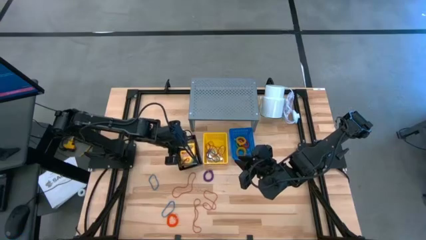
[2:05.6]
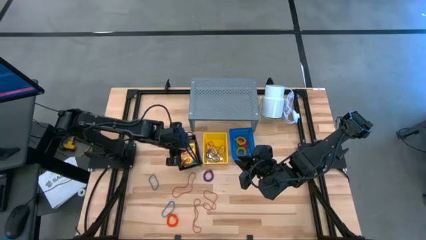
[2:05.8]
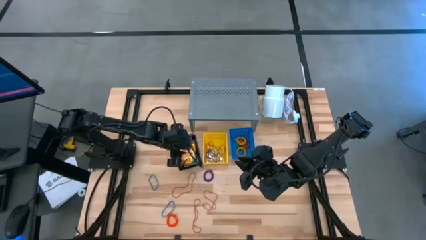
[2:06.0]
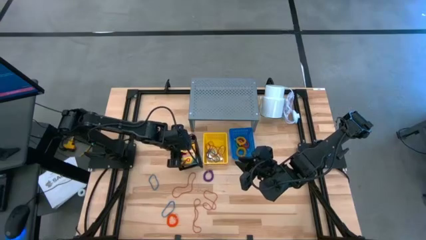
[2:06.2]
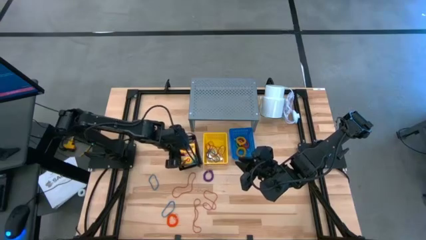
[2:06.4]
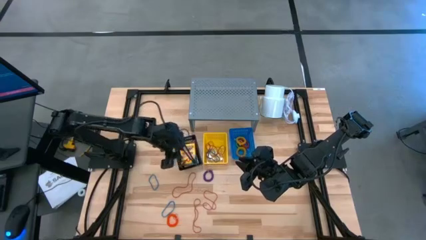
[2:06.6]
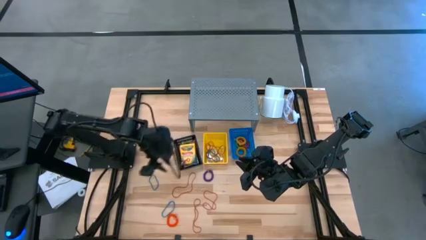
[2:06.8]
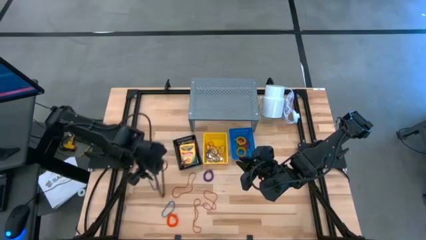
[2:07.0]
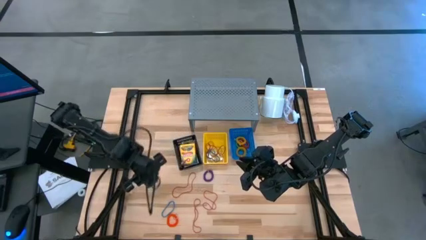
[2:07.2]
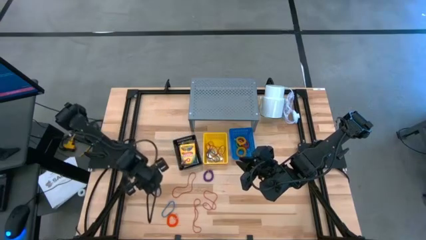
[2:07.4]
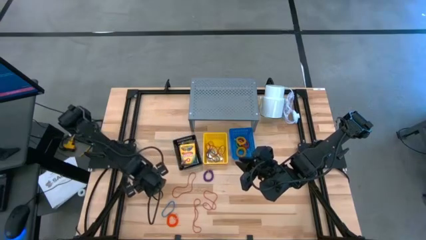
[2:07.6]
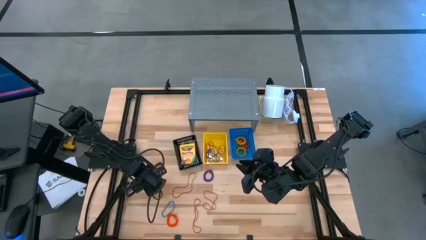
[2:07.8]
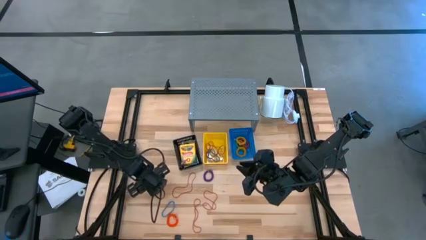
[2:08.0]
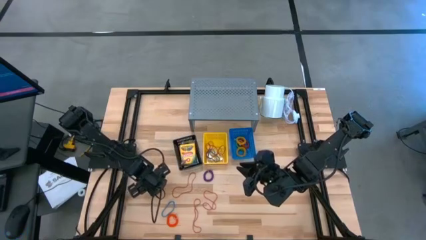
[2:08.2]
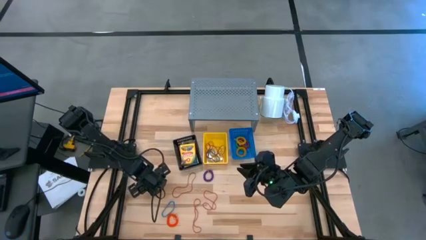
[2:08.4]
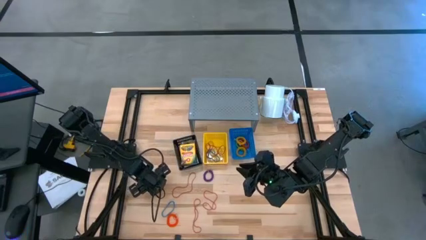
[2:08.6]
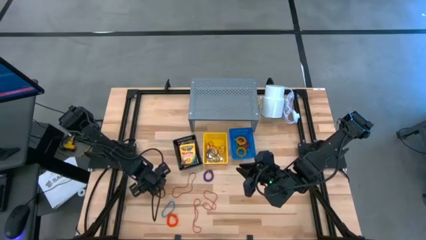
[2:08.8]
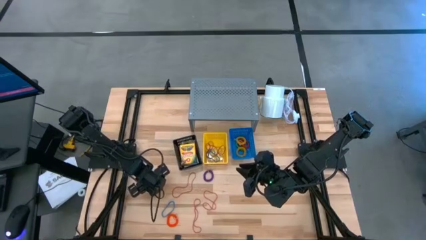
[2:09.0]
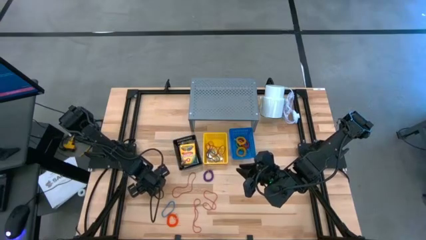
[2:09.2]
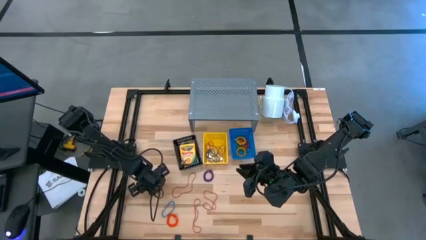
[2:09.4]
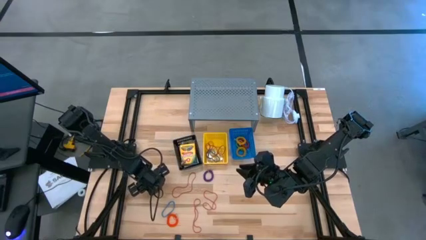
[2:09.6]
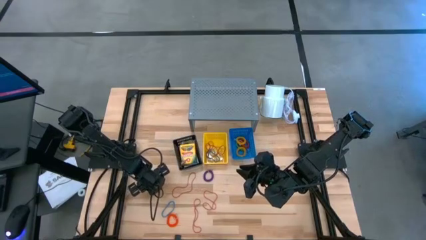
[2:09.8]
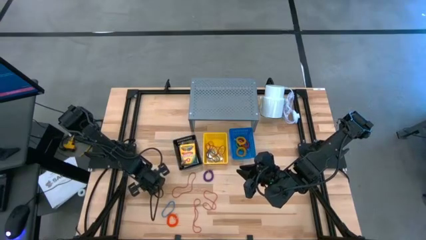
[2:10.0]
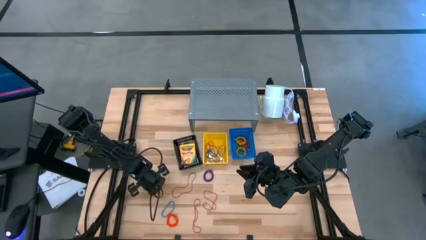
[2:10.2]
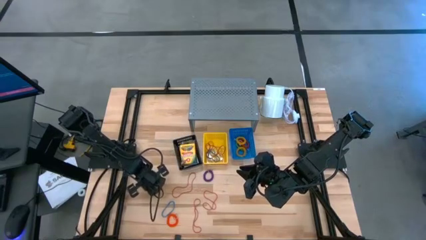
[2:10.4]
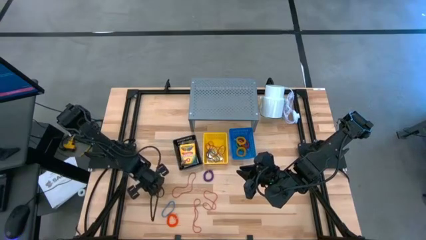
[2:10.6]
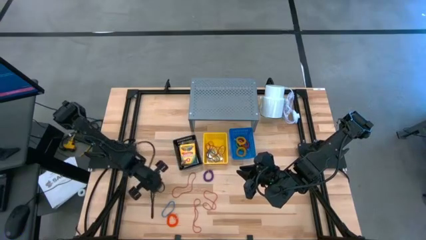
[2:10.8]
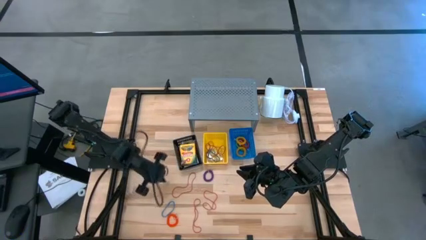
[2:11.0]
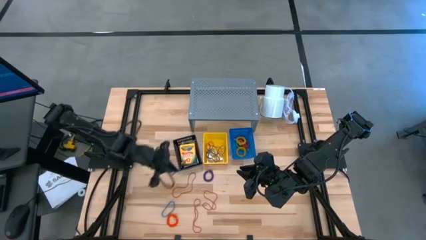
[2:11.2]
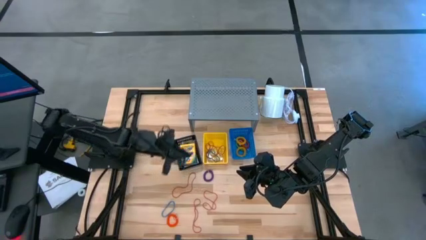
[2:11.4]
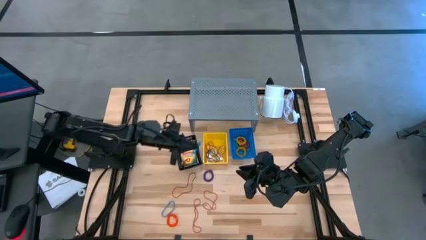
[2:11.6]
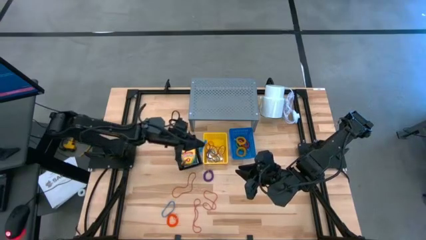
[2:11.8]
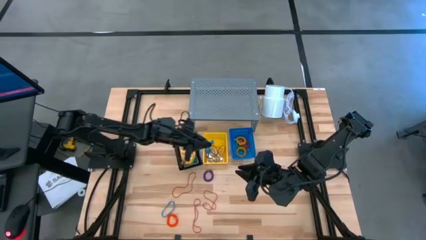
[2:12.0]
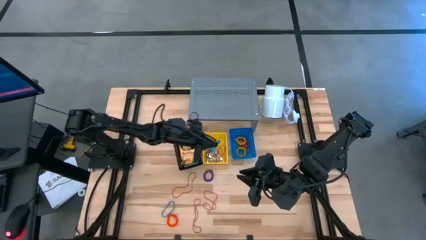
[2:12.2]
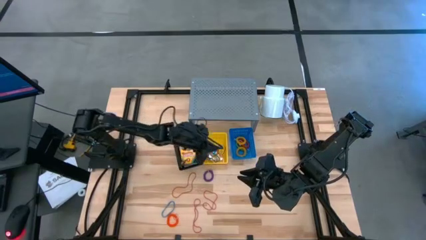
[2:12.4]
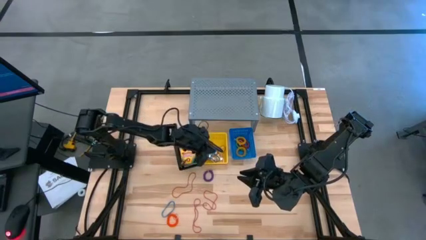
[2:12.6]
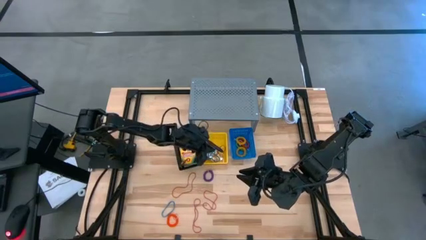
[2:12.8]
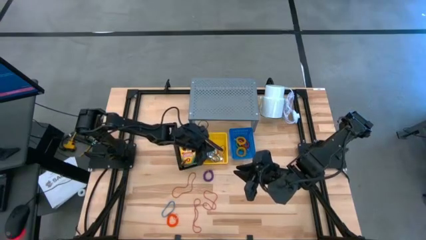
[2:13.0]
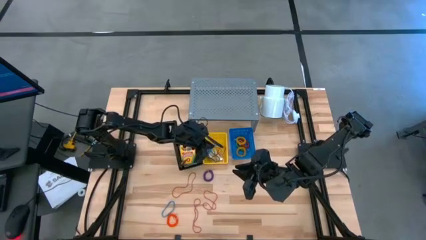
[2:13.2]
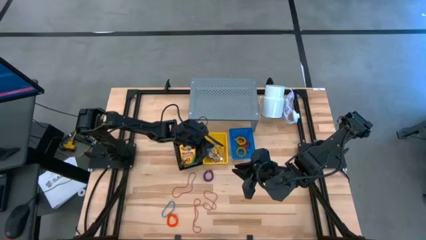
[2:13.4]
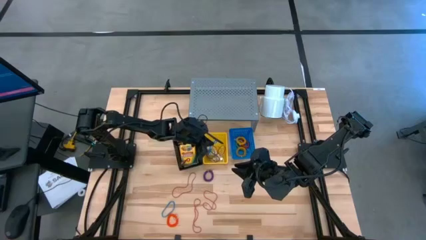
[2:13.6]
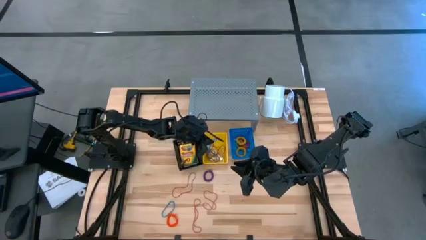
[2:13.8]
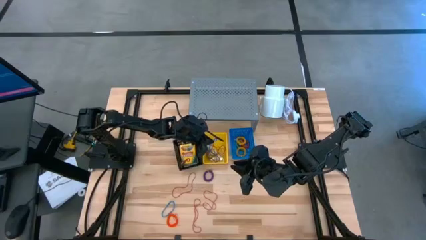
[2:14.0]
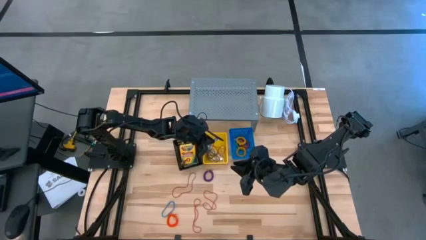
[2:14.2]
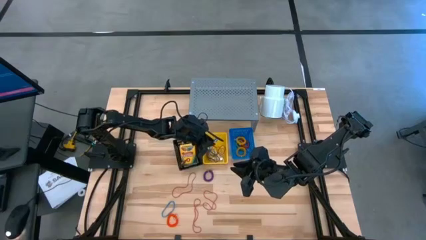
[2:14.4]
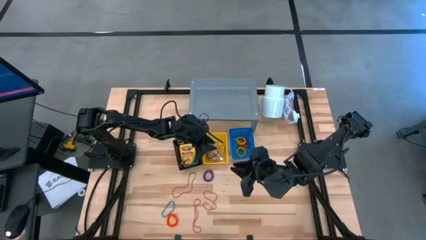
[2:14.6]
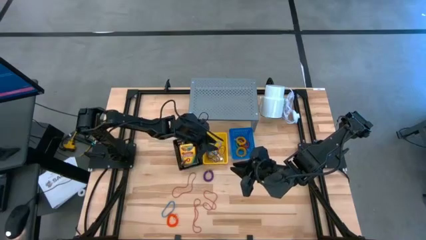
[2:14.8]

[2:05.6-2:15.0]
Task: Pick & Place Office Desk Supplies
Put the blue rubber band into the yellow basket

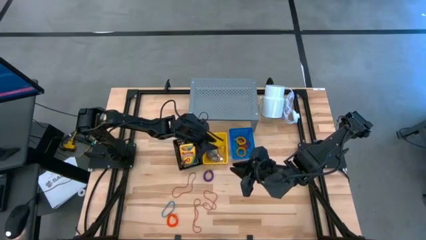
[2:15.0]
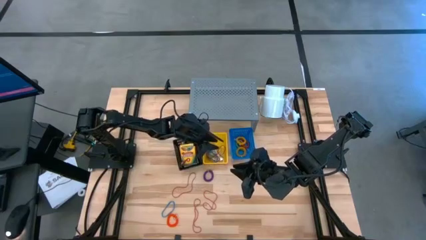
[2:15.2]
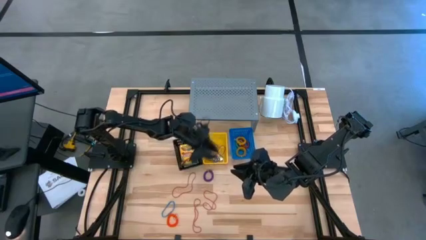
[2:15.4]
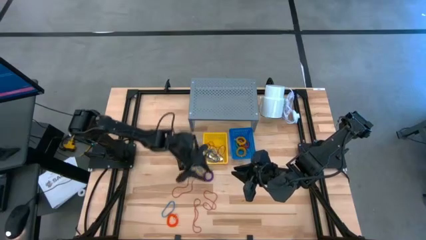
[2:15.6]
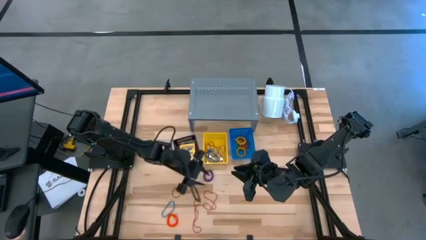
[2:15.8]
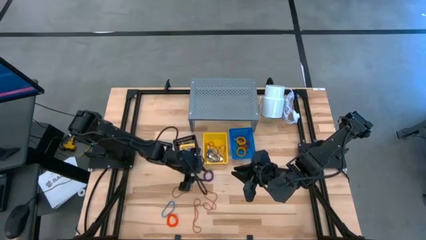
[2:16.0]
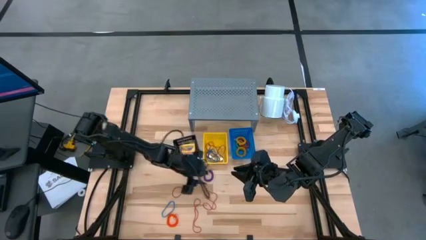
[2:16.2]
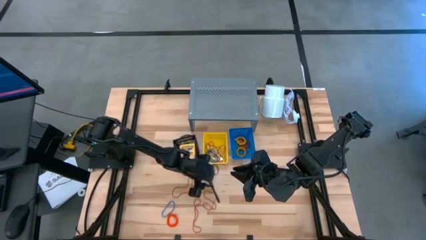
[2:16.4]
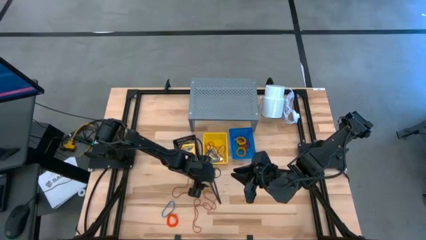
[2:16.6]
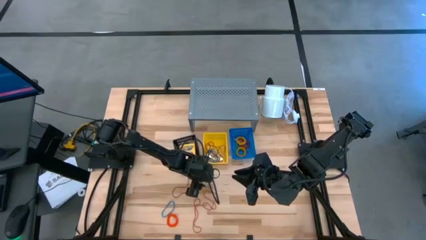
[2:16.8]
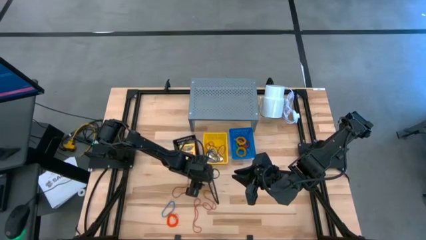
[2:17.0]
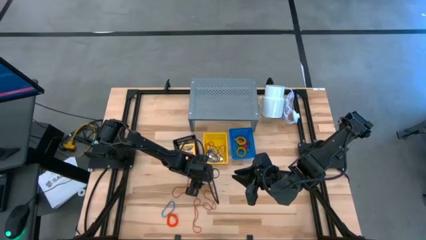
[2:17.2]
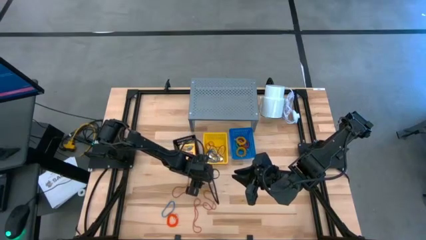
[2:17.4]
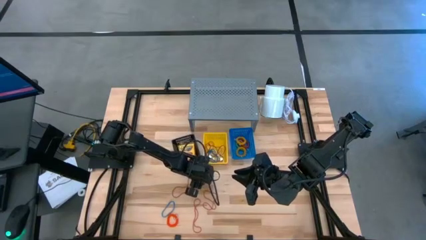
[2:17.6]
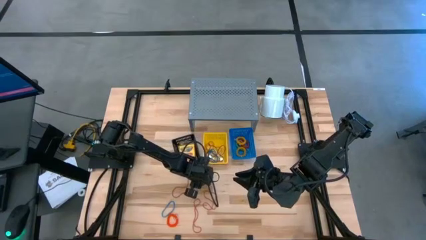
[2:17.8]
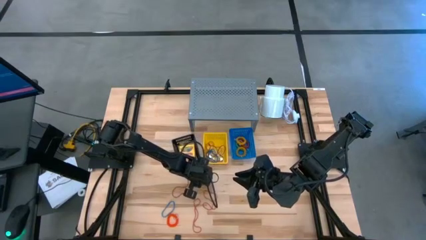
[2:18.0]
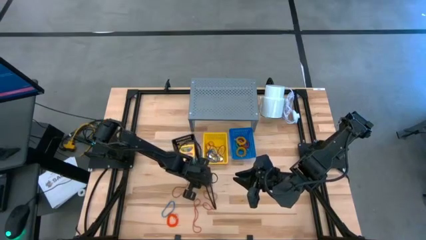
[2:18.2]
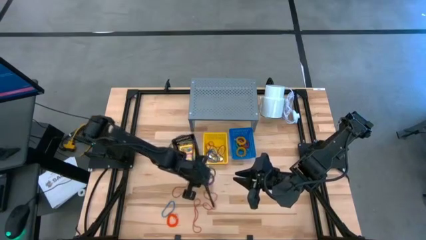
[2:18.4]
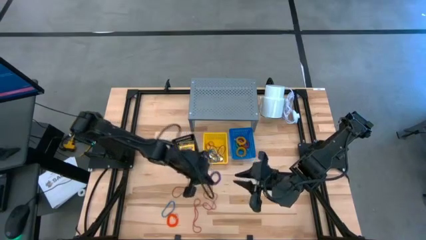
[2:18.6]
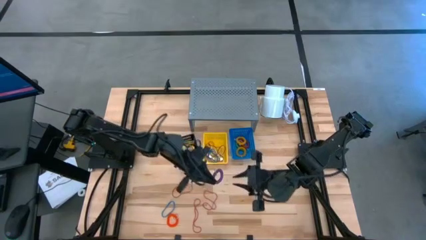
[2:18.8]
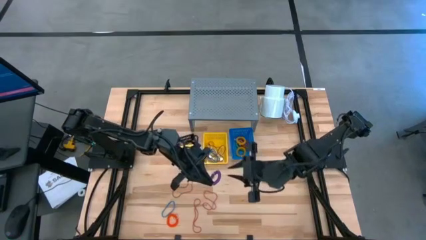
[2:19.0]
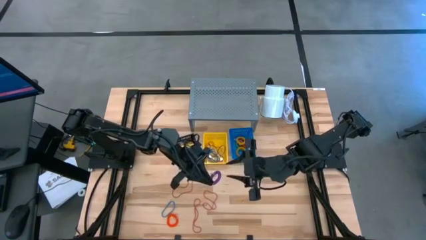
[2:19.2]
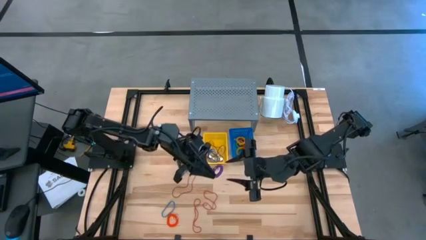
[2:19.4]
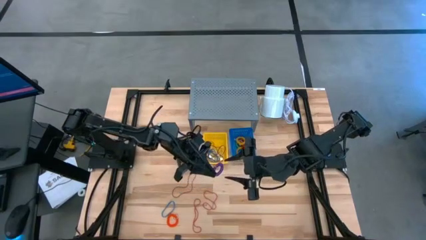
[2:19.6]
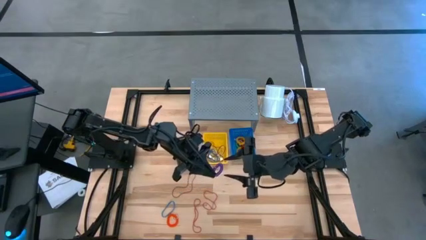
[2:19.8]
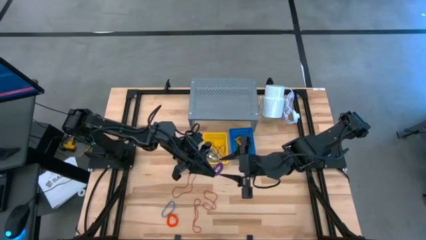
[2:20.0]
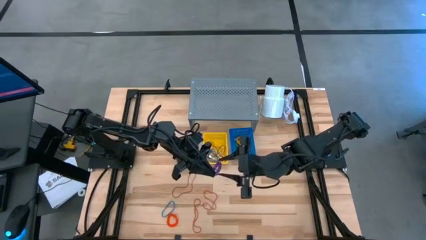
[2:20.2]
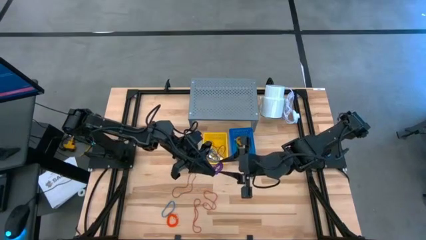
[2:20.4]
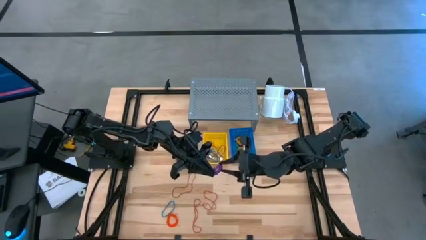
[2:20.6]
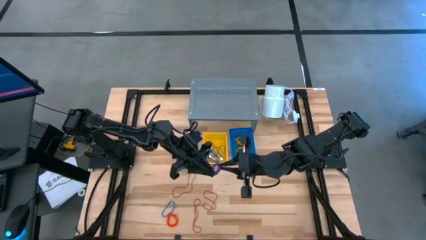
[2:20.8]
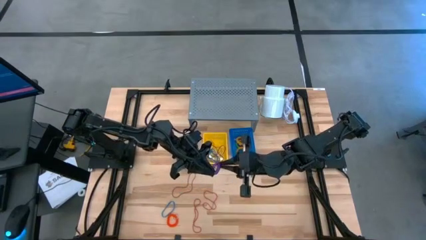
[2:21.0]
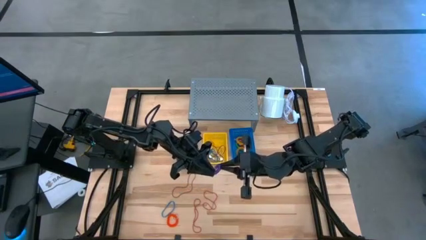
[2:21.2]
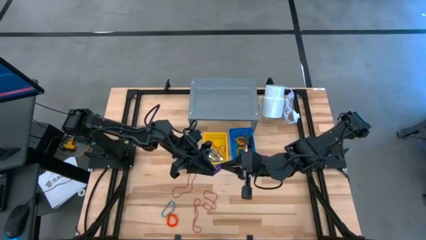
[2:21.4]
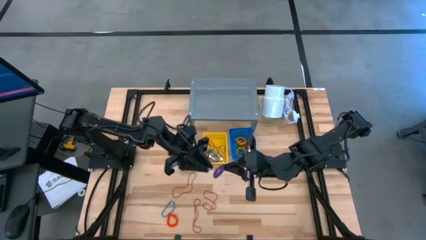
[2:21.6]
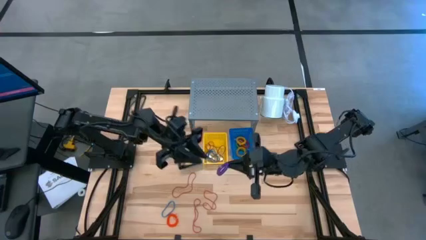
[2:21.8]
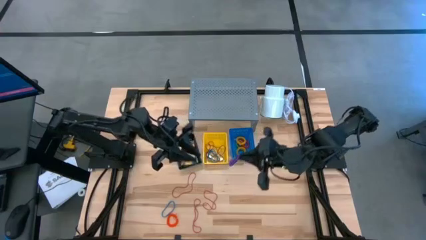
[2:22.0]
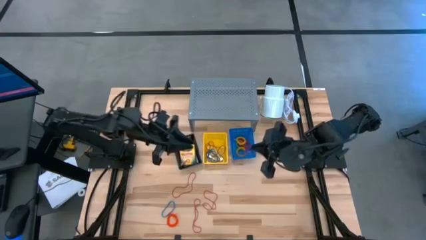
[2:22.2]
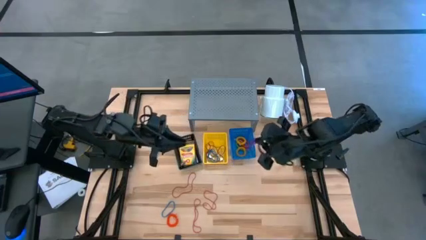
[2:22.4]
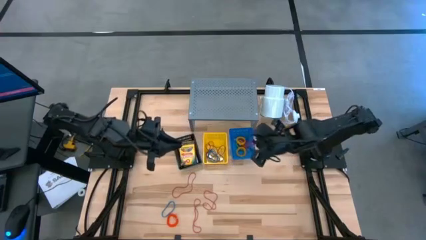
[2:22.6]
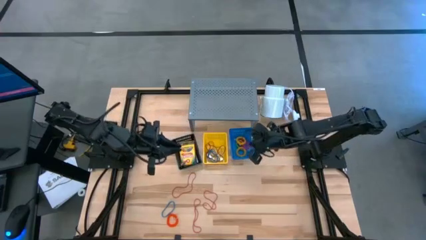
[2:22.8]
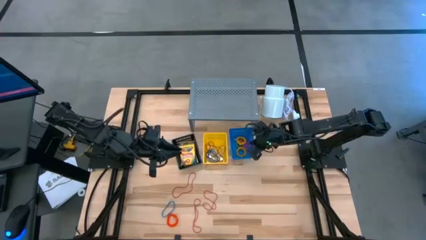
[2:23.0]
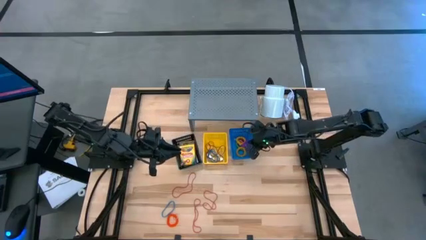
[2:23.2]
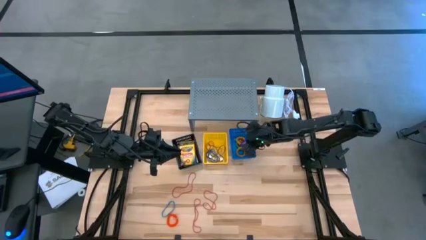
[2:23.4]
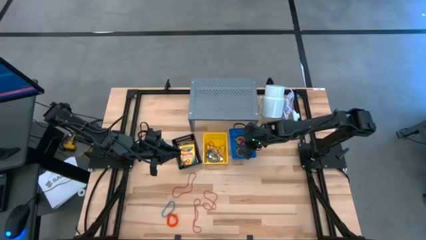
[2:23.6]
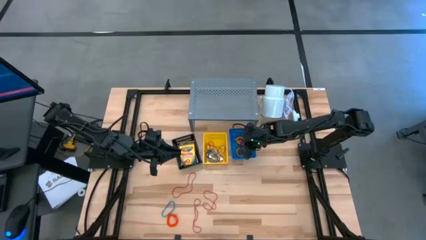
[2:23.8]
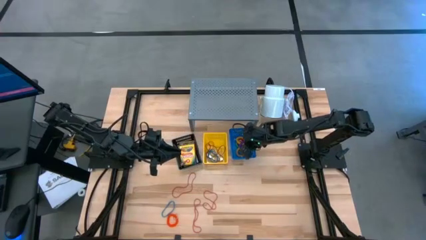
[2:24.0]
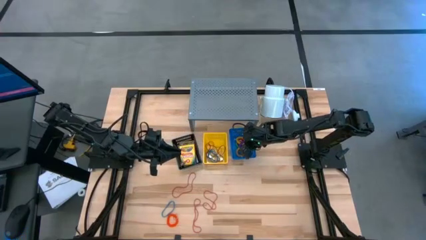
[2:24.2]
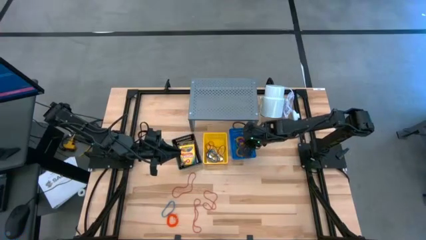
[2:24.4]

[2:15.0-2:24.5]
Put the purple spring keychain into the blue basket
